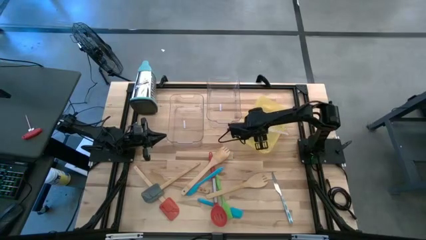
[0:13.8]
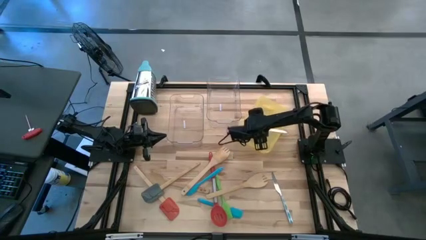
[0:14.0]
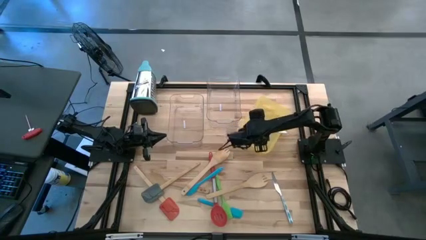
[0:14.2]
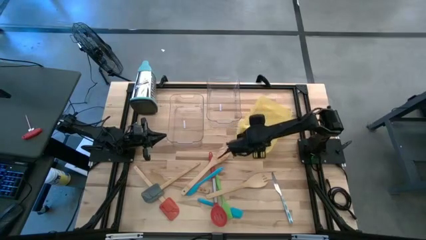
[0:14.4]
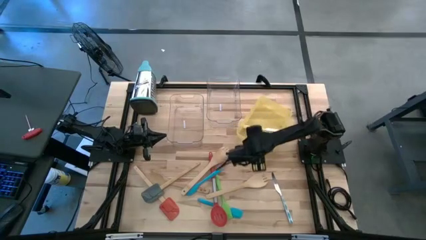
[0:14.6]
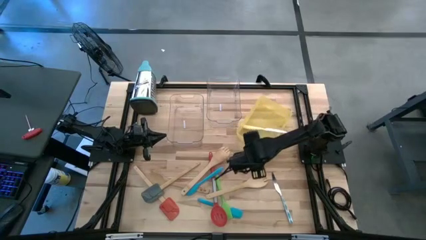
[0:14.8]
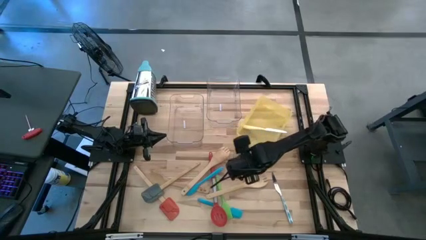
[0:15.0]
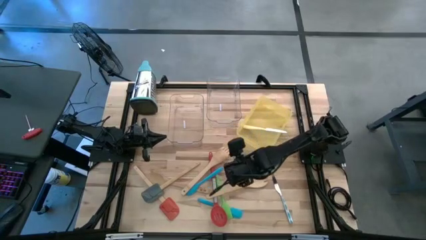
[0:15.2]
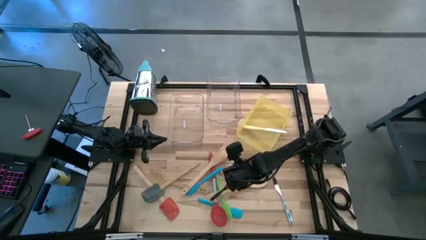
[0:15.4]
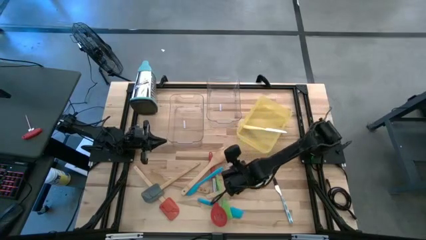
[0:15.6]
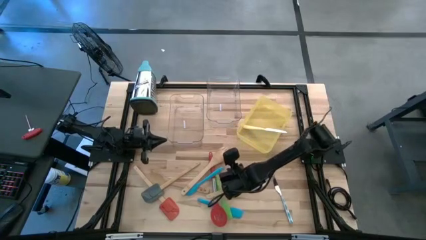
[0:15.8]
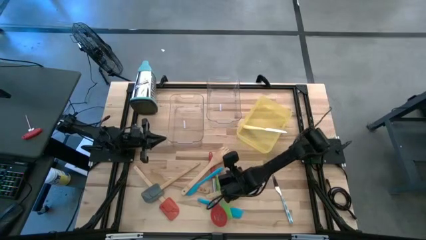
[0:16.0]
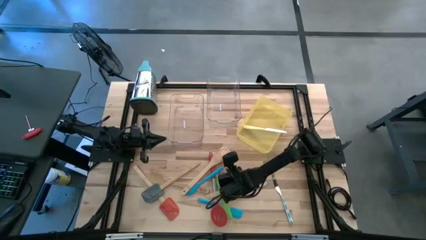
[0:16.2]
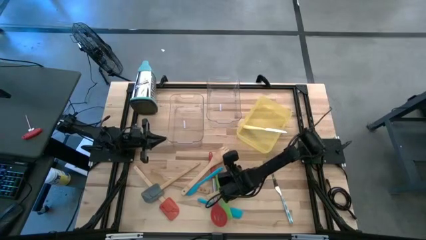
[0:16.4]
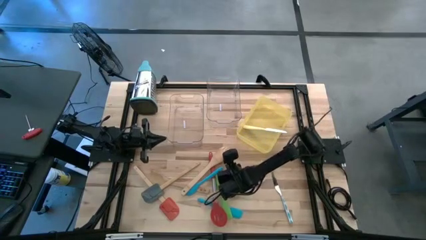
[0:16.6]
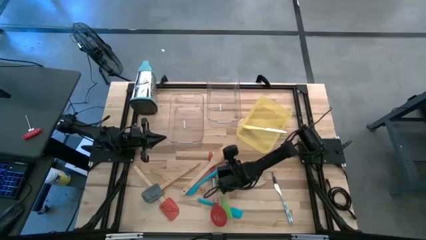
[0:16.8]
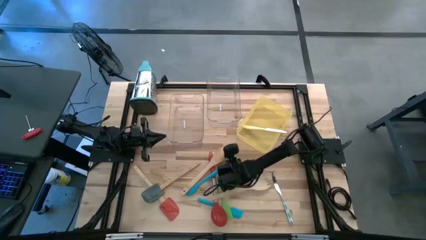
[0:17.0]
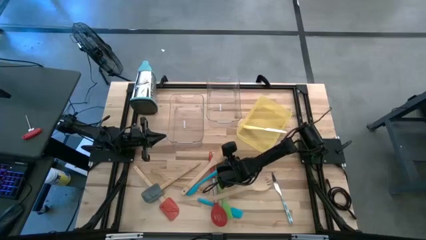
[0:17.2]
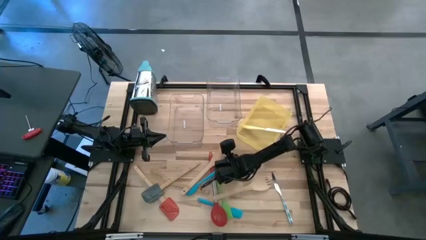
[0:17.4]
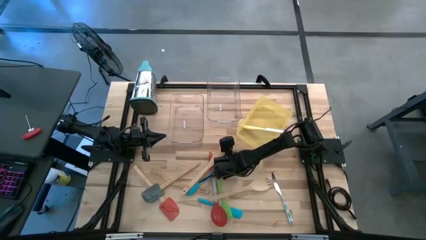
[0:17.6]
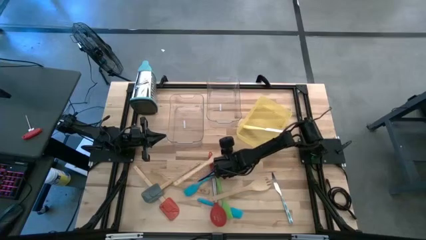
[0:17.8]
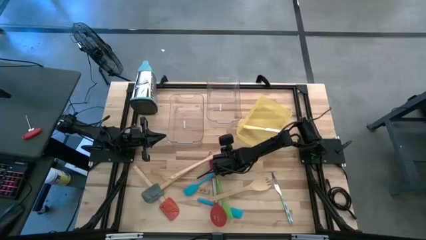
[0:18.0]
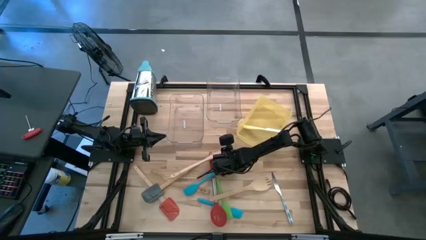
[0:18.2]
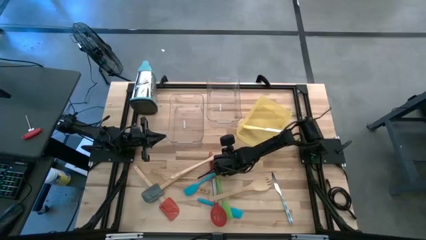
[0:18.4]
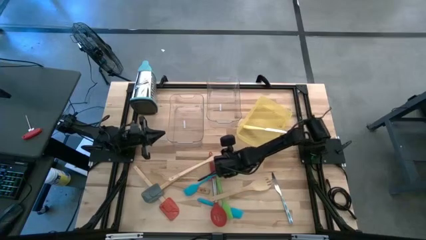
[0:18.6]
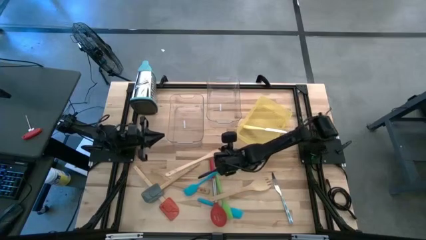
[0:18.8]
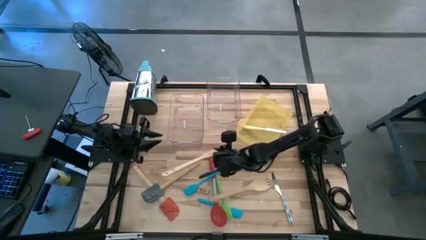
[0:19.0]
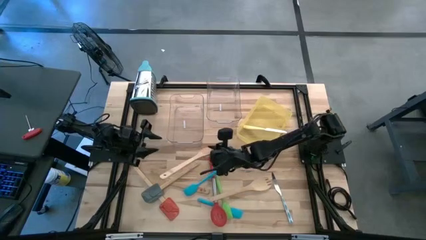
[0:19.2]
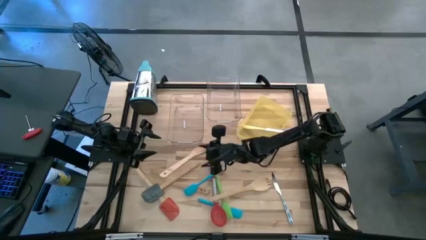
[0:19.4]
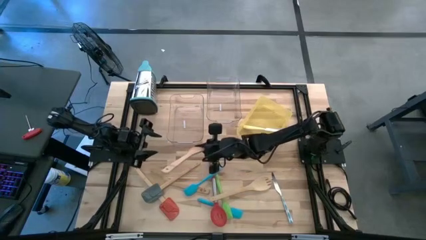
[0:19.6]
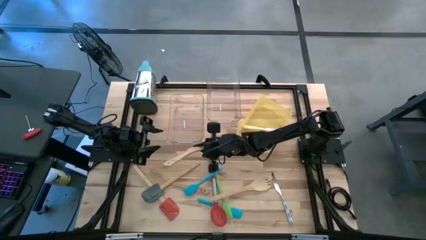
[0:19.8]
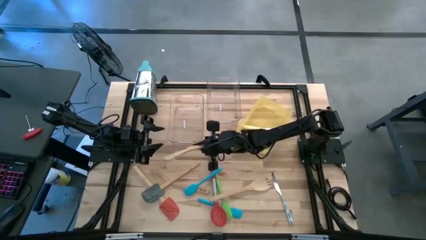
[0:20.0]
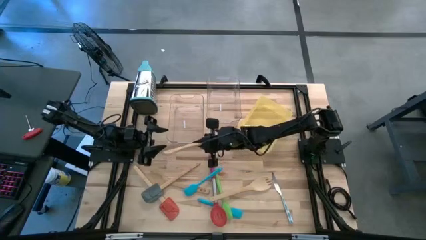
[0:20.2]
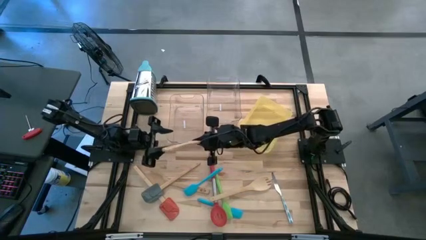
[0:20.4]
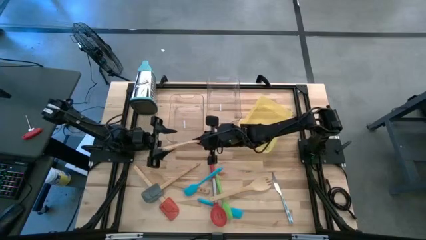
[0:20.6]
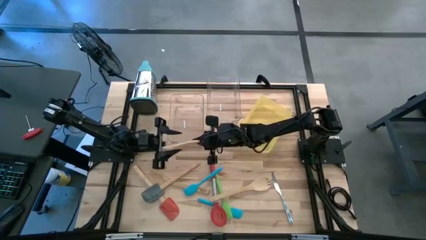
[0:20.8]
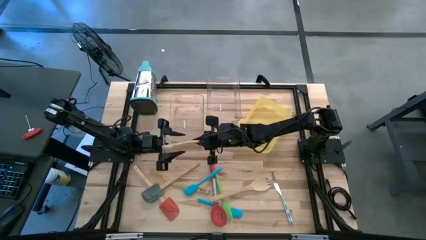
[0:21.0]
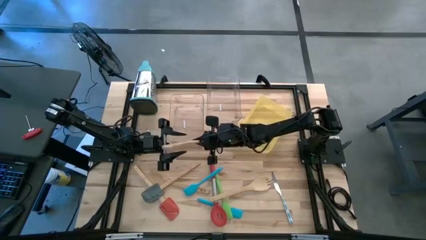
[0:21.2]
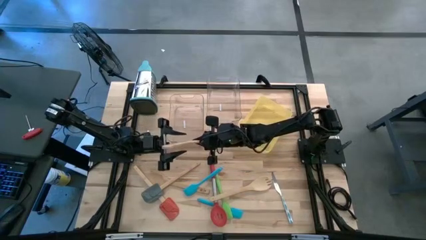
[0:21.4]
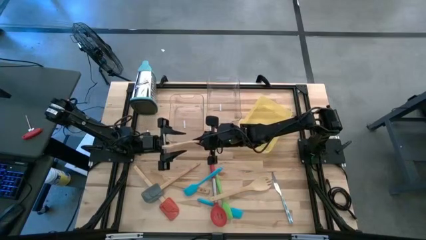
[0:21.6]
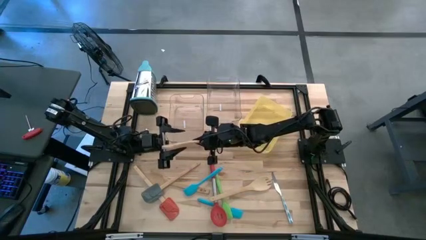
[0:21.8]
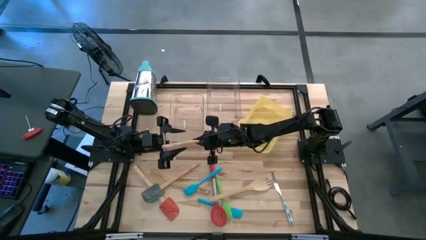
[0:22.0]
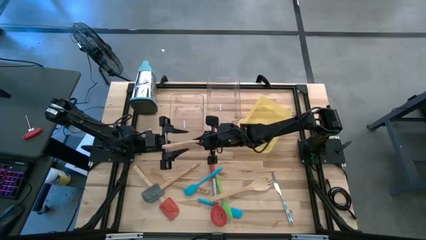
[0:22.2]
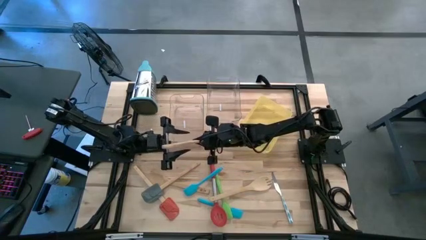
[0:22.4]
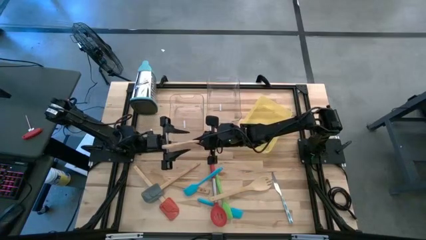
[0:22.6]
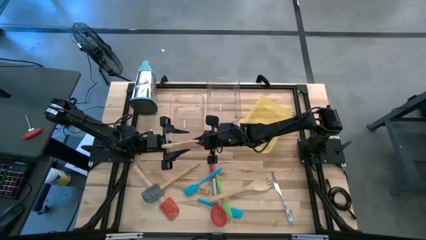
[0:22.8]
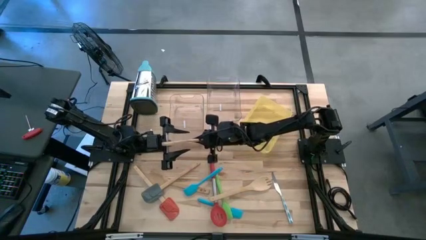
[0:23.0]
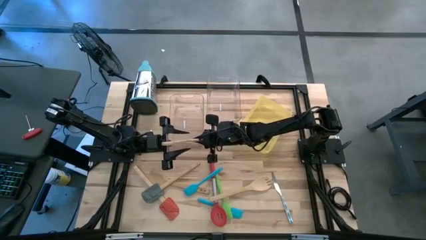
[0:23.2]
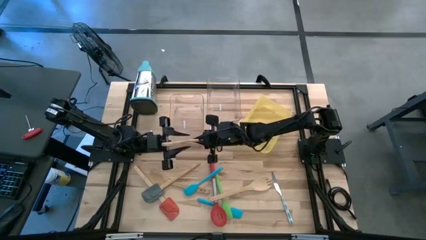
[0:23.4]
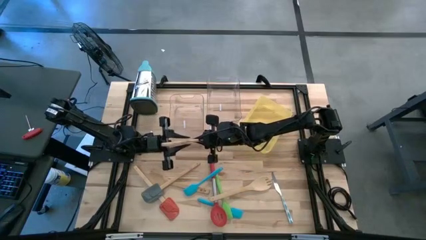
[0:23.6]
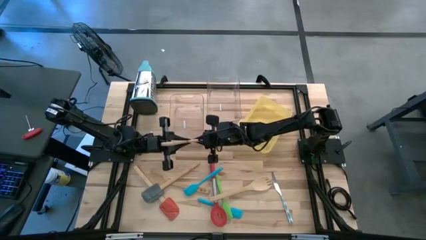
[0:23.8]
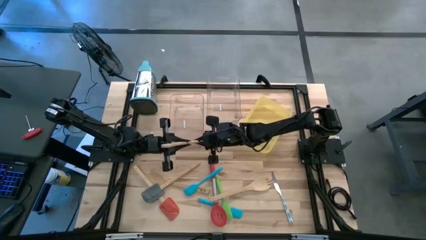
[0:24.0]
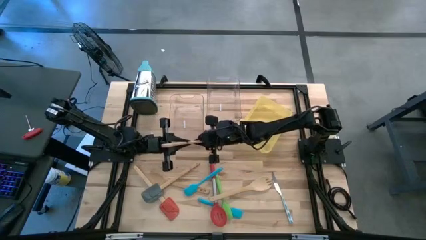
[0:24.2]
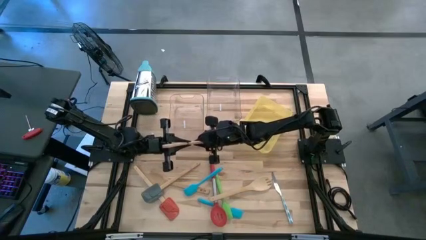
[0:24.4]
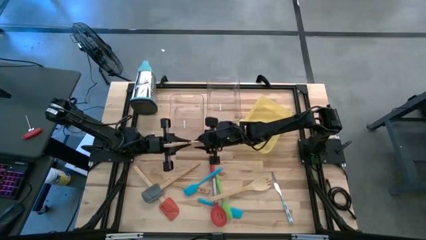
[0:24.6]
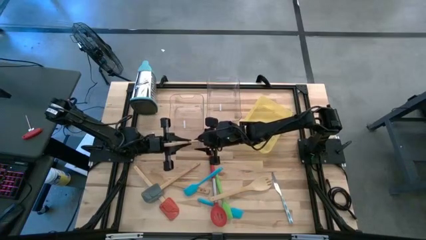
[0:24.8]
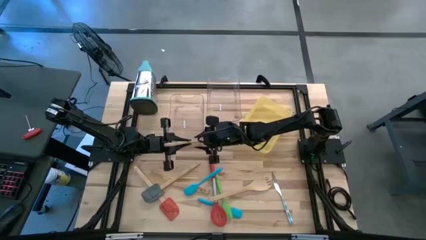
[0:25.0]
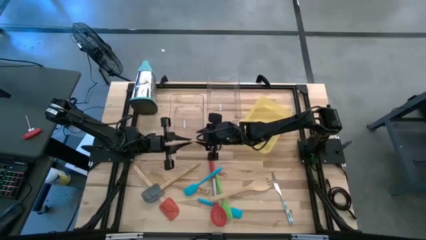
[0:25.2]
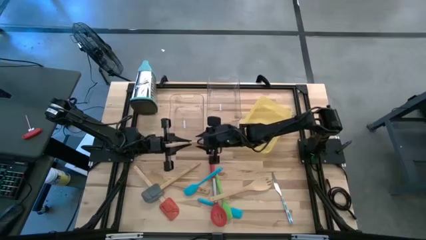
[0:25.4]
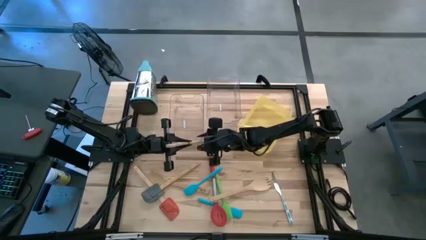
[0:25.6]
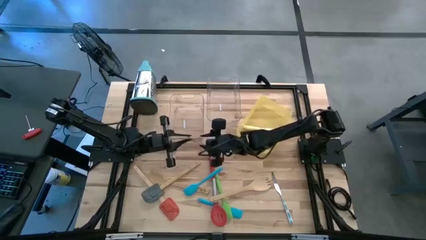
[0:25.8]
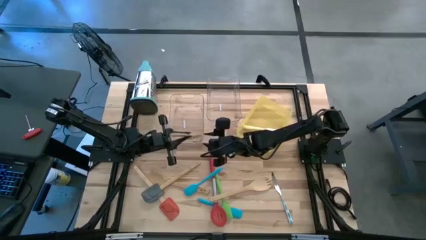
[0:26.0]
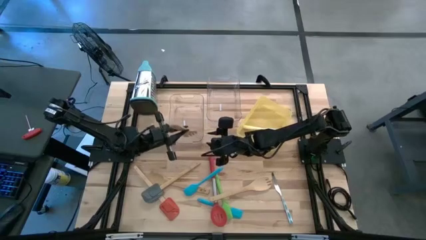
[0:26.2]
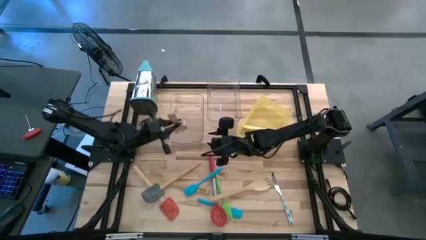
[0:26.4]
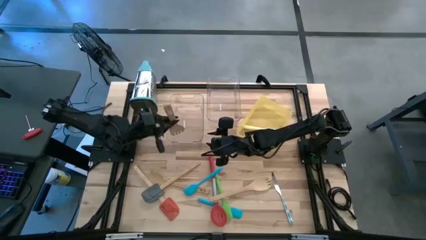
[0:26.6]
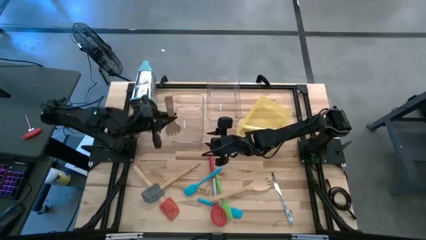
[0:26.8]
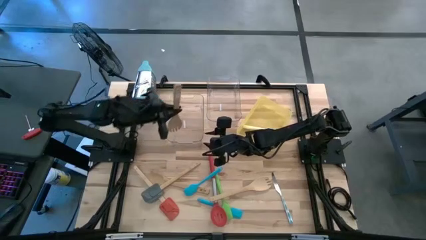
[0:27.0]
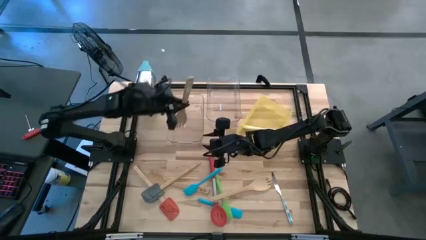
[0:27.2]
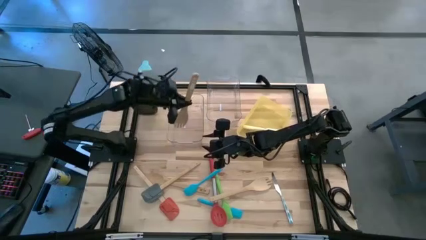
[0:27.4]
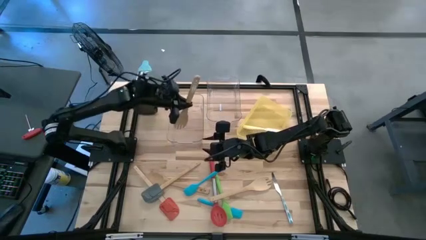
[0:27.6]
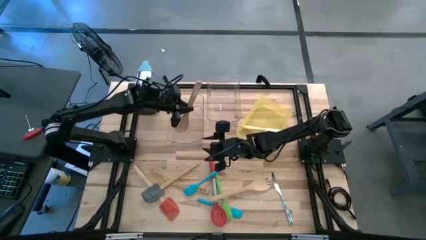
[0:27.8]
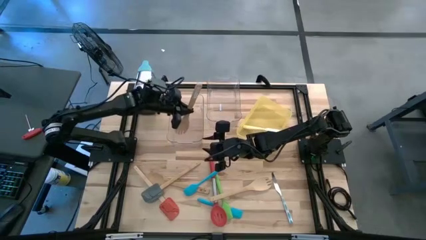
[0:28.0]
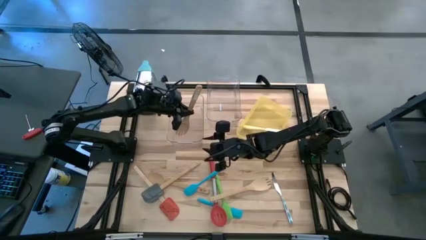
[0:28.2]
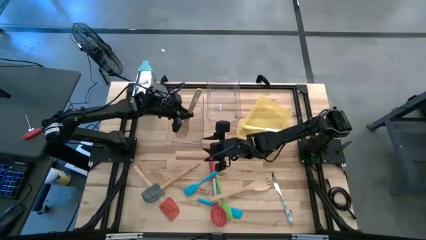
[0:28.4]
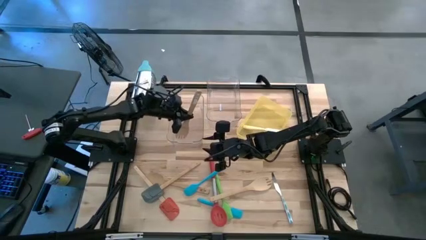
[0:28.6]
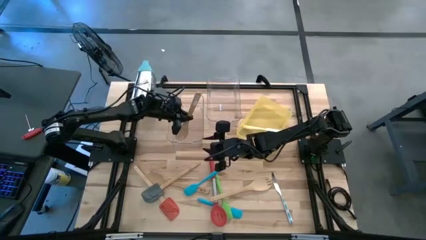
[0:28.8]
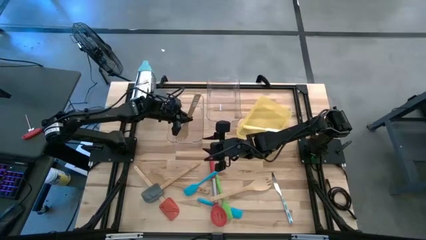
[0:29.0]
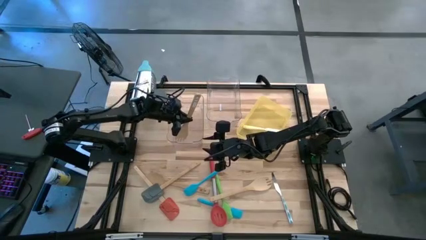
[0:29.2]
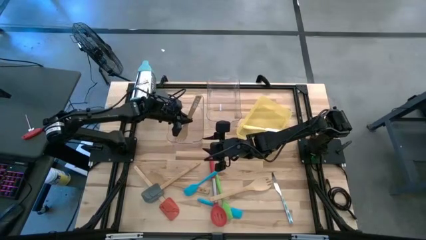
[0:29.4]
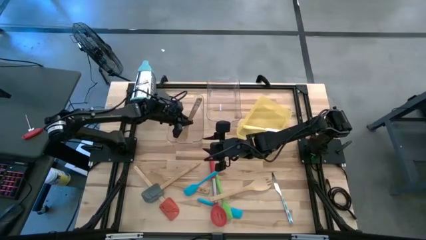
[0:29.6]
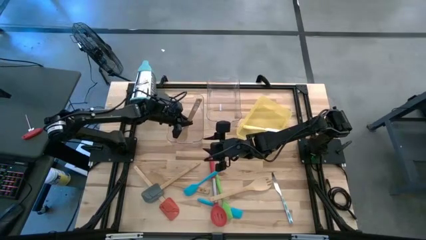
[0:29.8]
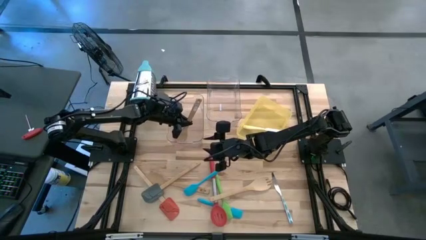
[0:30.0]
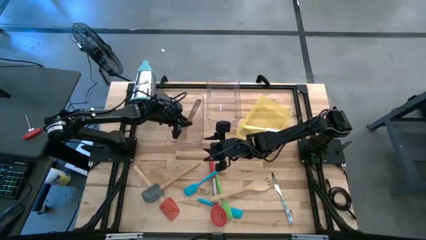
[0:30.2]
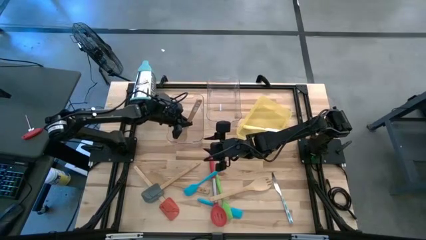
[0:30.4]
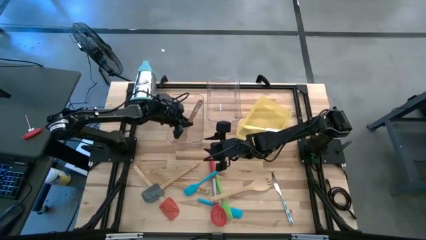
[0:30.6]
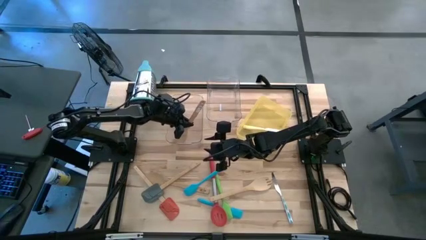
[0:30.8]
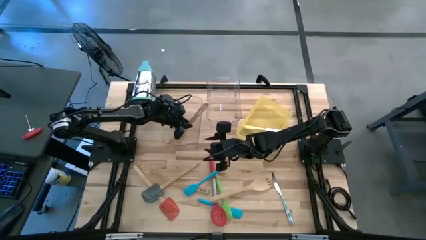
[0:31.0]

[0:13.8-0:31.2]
Task: Pick & Place Kitchen Items
Put the top wooden spork into left transparent bin
